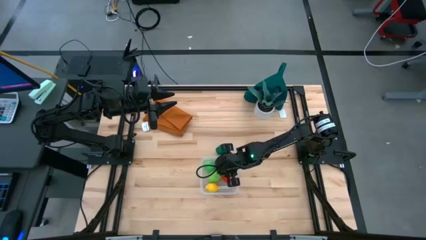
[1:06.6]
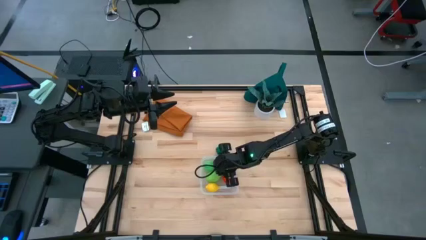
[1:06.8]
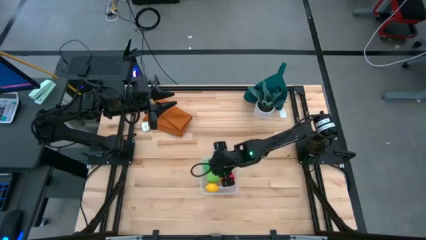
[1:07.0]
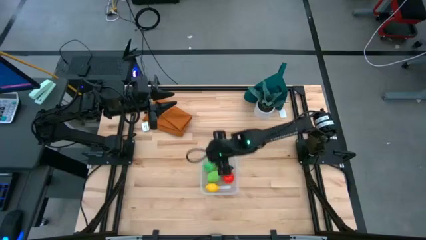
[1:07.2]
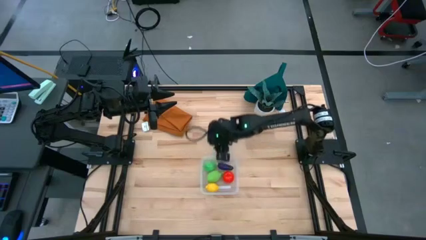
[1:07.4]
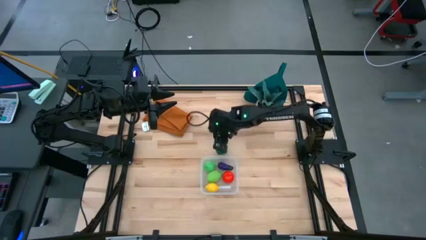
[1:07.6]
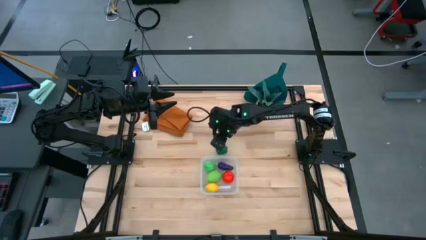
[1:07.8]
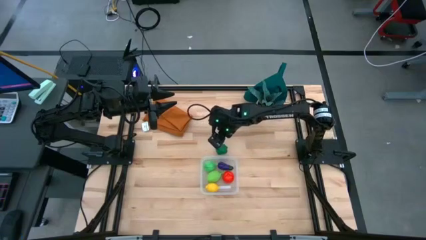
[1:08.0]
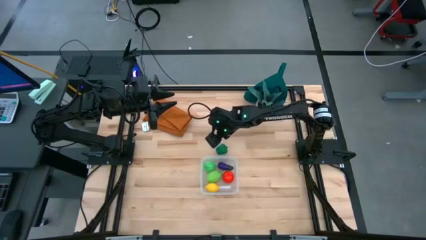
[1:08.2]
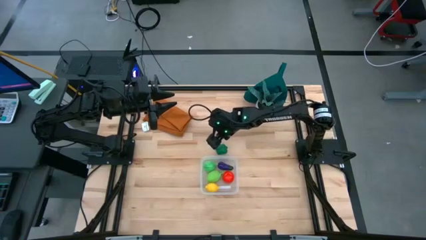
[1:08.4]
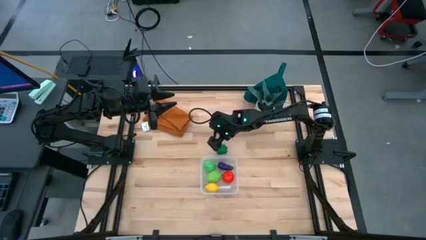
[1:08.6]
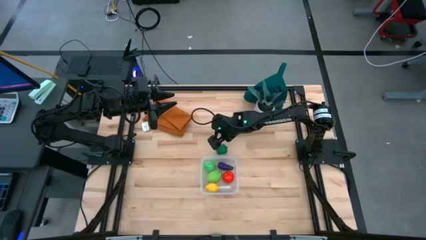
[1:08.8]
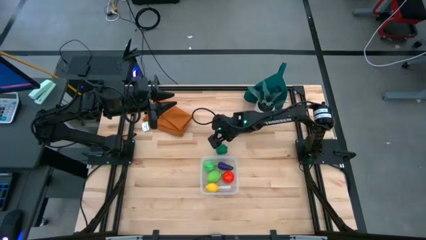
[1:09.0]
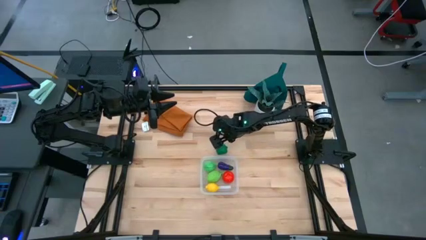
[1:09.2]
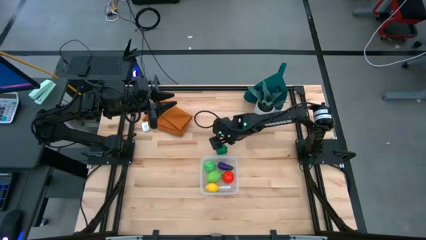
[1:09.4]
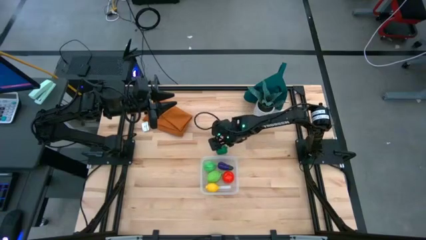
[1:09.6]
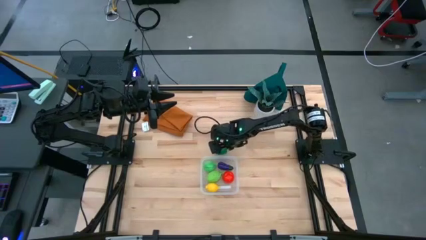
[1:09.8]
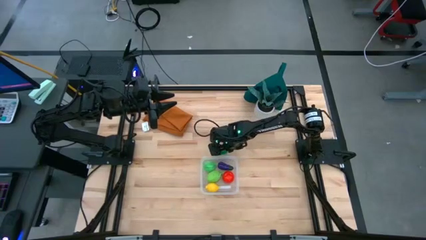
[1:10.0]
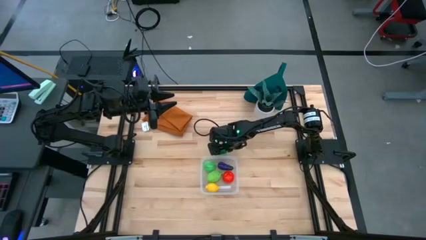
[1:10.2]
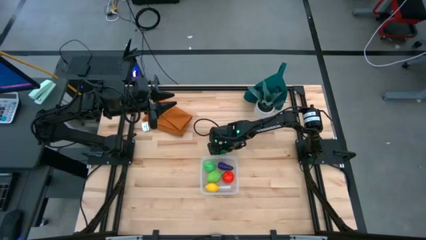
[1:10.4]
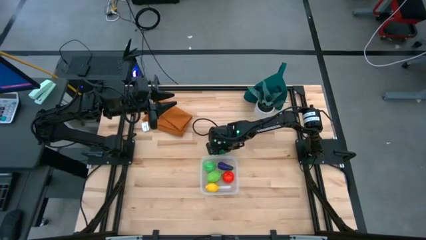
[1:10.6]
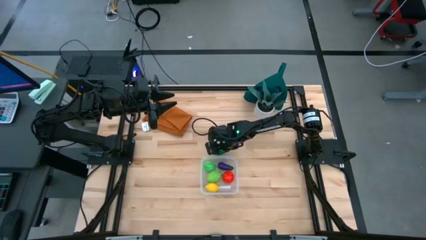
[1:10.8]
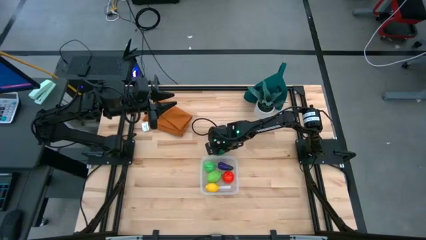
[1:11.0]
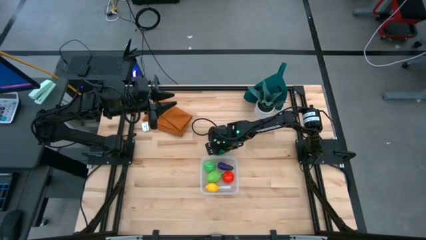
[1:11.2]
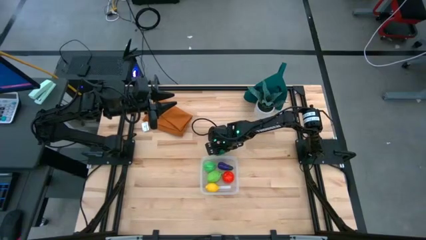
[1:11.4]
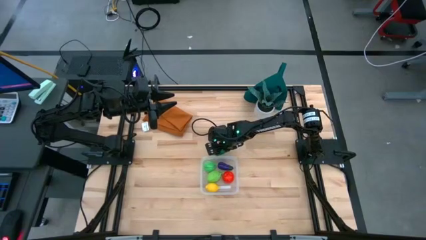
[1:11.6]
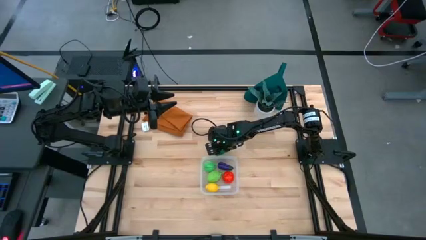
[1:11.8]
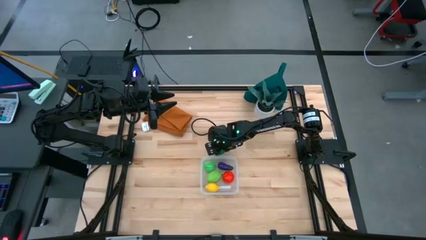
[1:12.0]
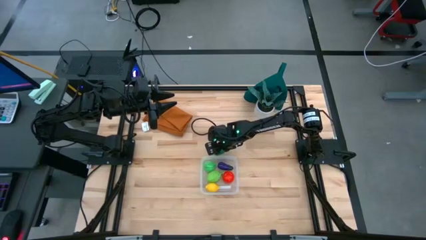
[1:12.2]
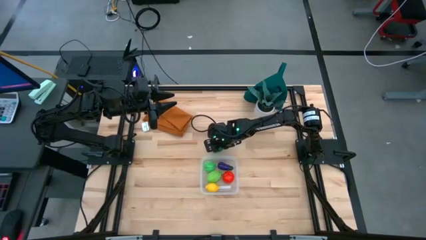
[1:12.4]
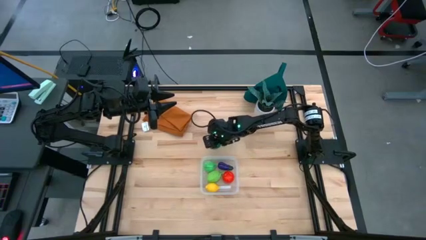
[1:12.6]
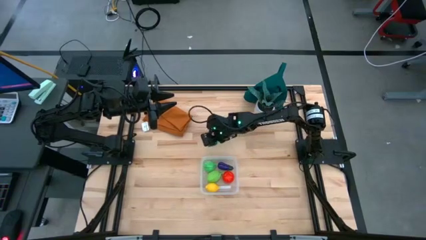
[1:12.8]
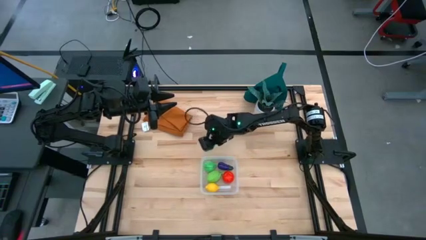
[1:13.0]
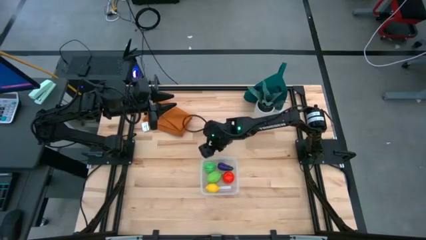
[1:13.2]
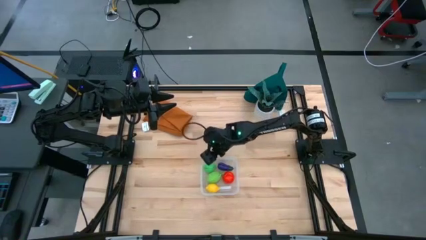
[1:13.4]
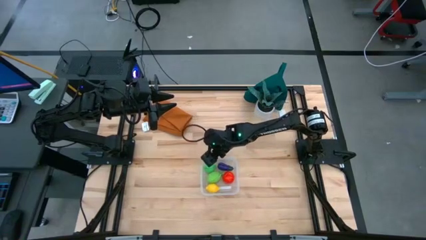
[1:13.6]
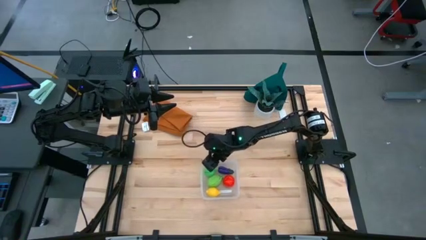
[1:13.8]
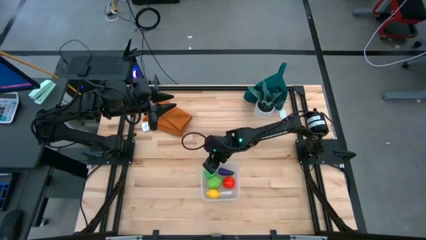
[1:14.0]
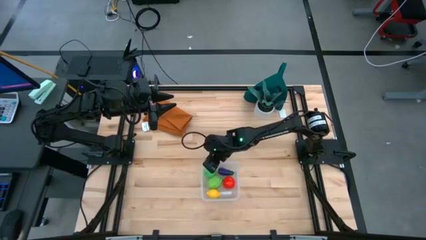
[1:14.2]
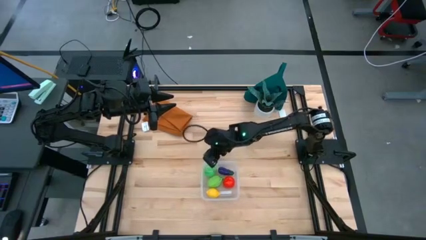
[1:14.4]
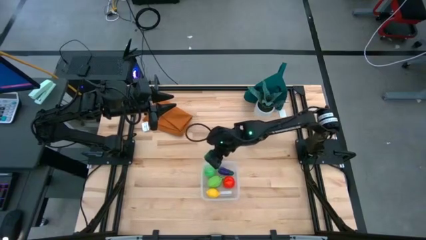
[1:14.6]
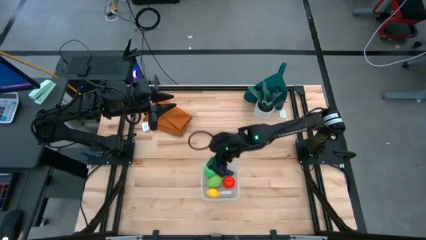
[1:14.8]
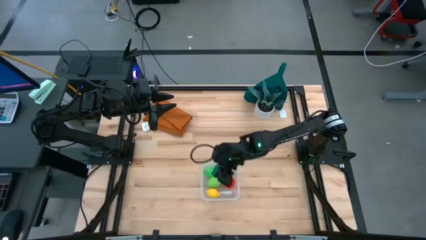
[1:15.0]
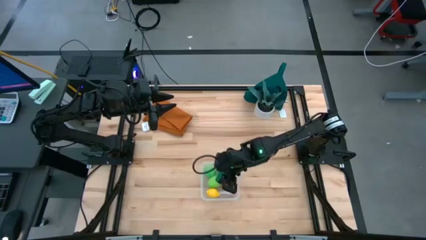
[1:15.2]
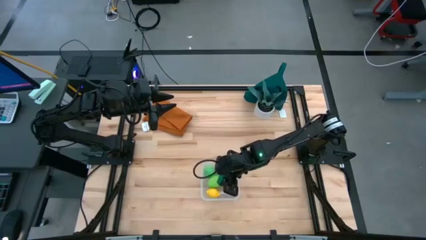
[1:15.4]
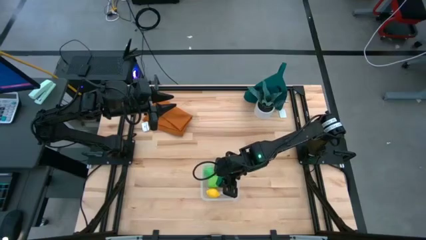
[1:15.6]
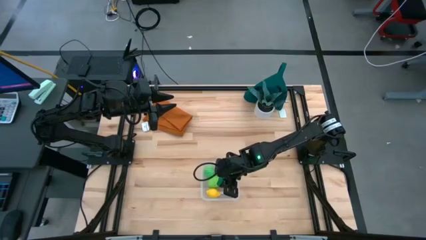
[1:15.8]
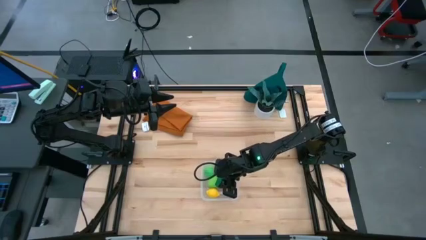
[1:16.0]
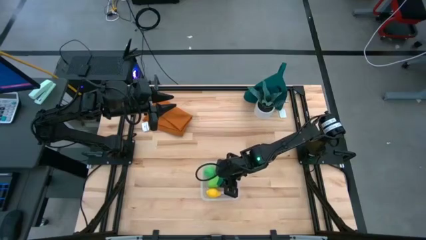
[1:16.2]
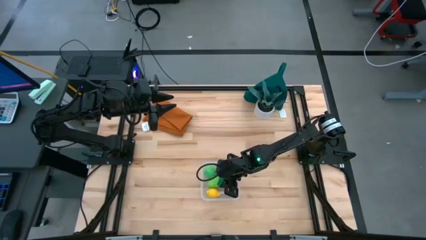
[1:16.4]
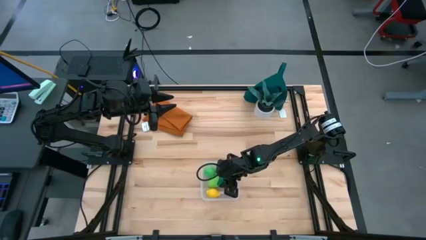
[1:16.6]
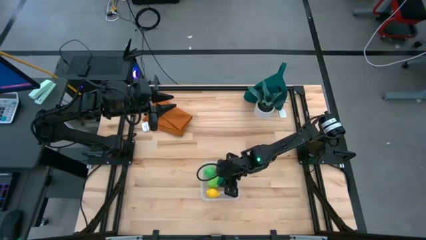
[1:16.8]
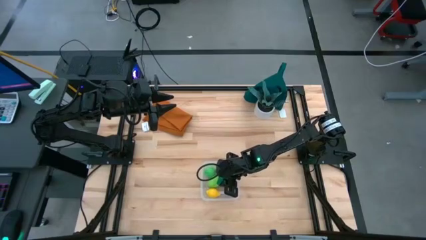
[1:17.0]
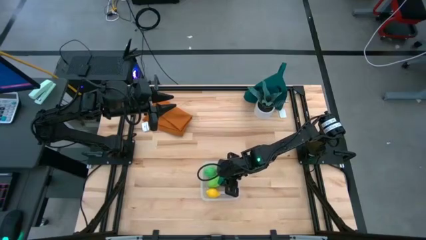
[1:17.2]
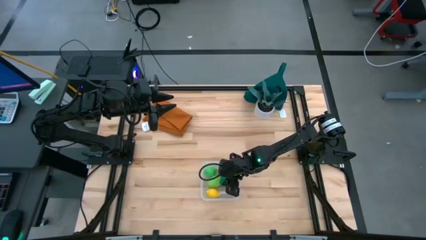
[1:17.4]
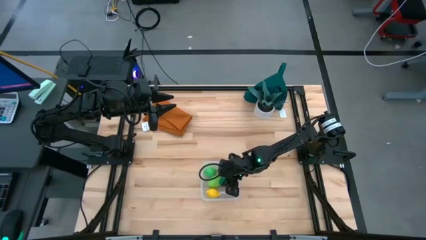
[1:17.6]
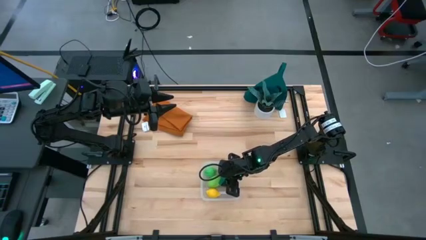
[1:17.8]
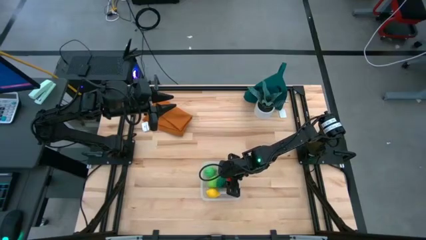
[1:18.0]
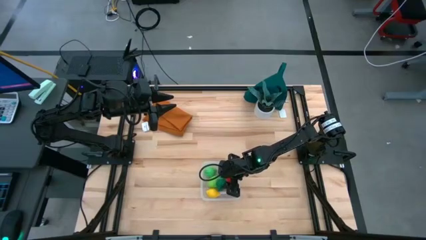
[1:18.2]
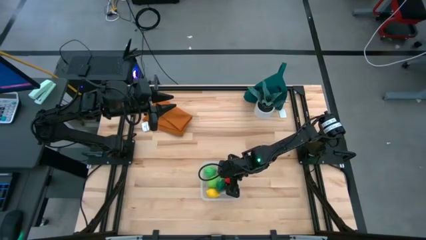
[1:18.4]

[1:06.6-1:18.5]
Task: Pick and placing Produce into tupperware
Put the bell pepper into the transparent bin
